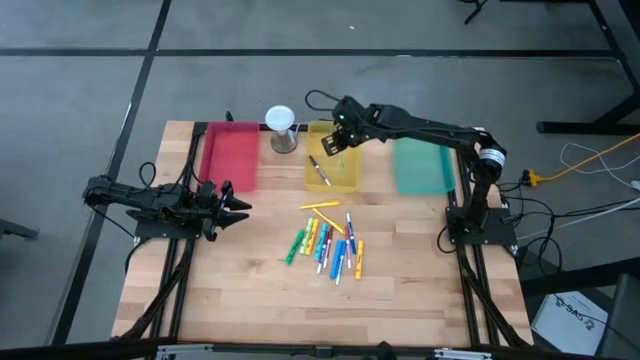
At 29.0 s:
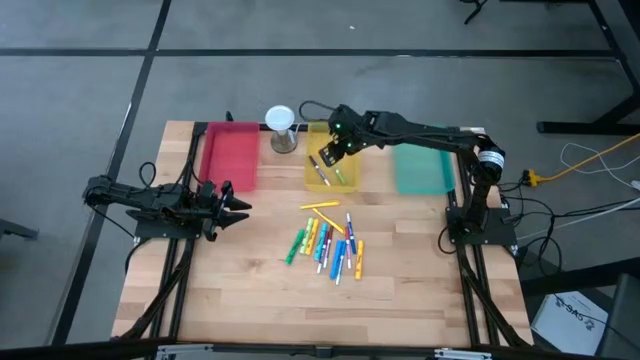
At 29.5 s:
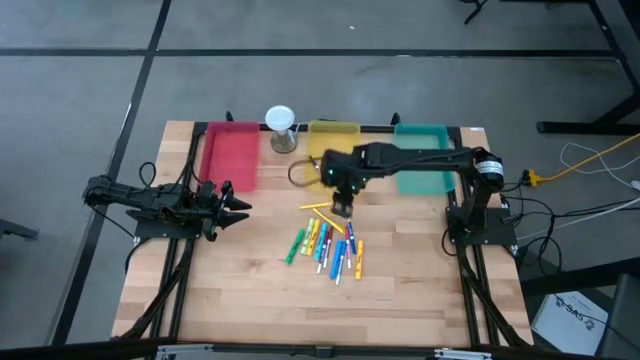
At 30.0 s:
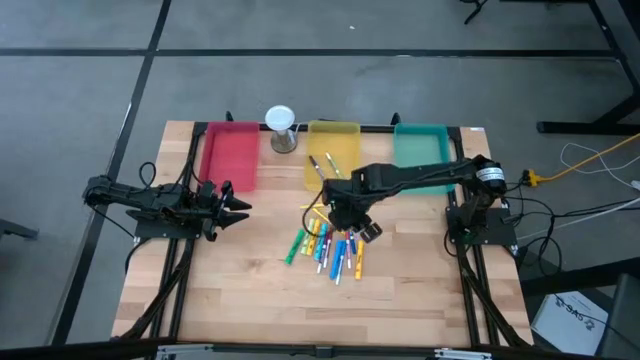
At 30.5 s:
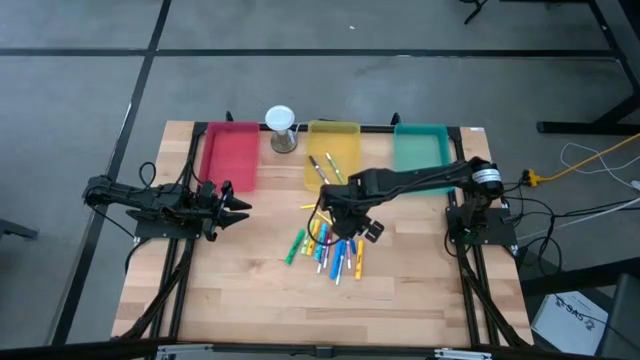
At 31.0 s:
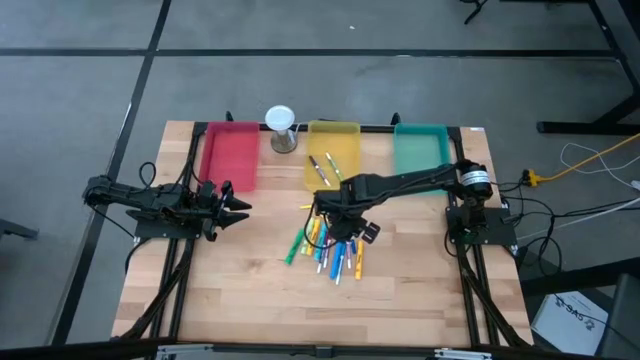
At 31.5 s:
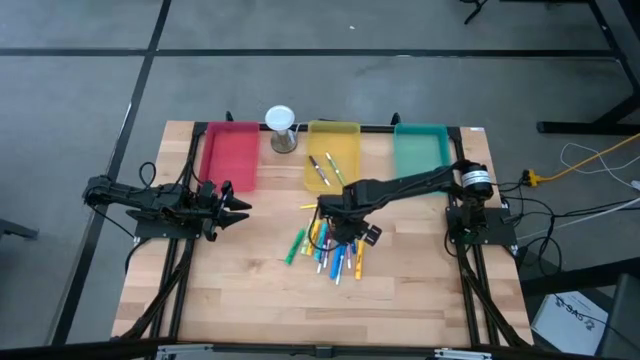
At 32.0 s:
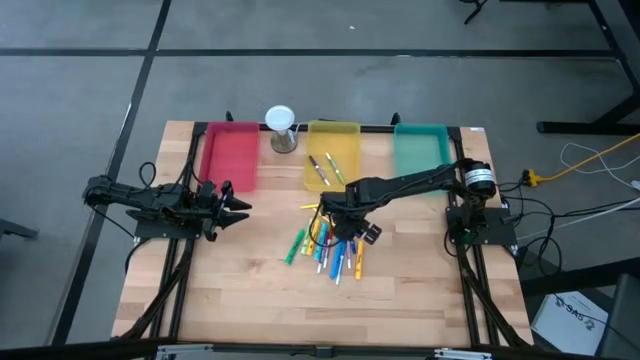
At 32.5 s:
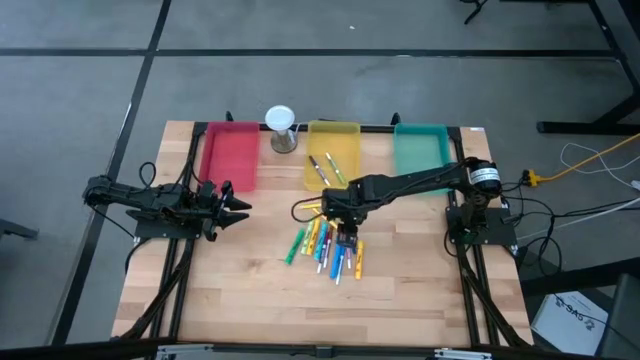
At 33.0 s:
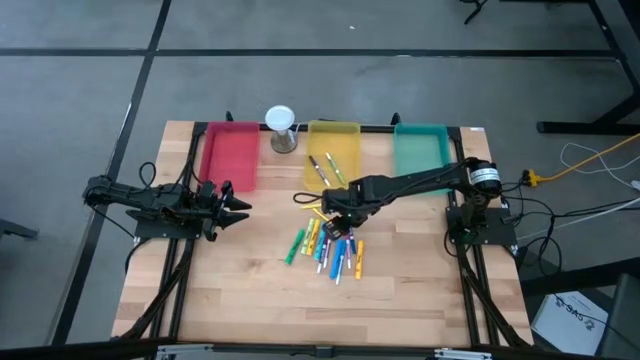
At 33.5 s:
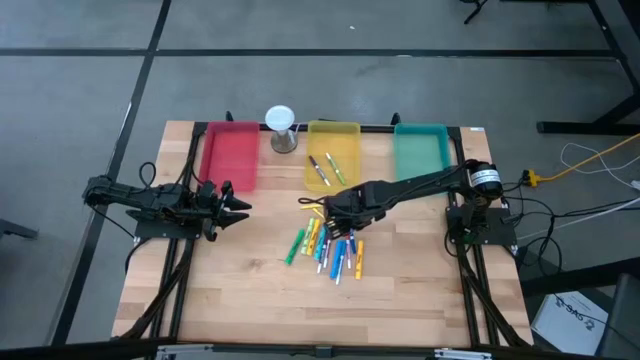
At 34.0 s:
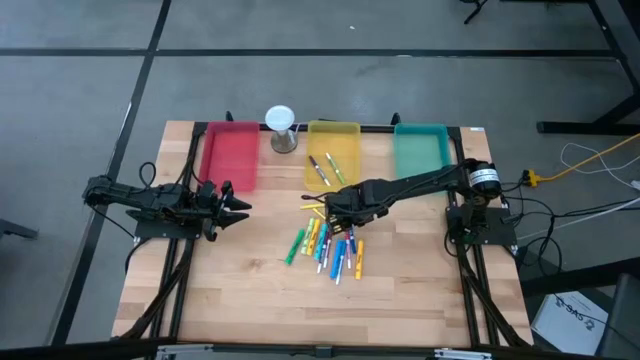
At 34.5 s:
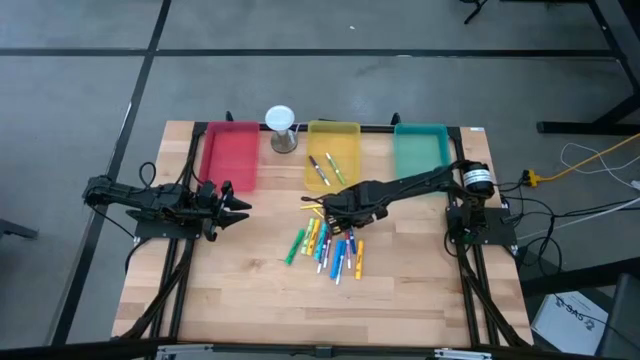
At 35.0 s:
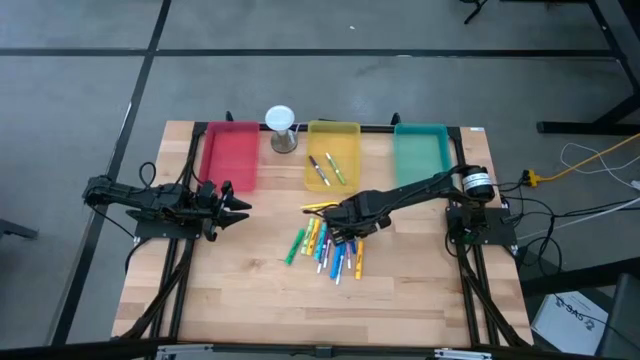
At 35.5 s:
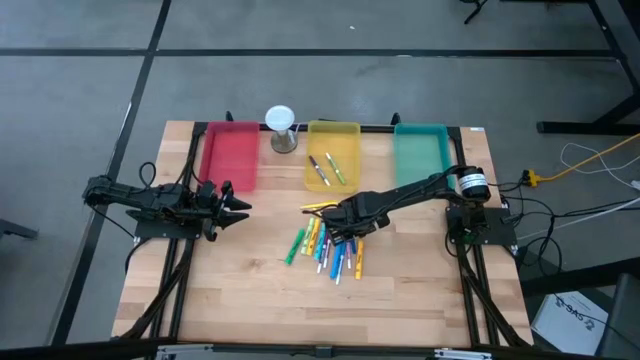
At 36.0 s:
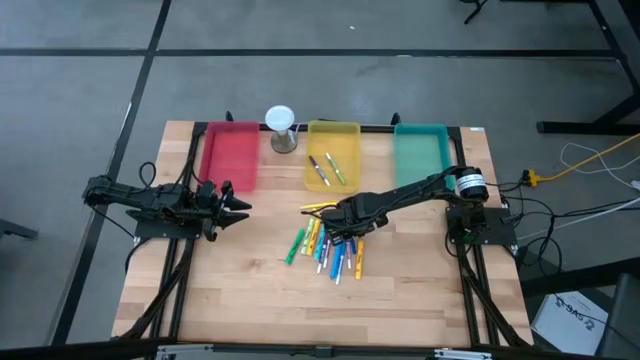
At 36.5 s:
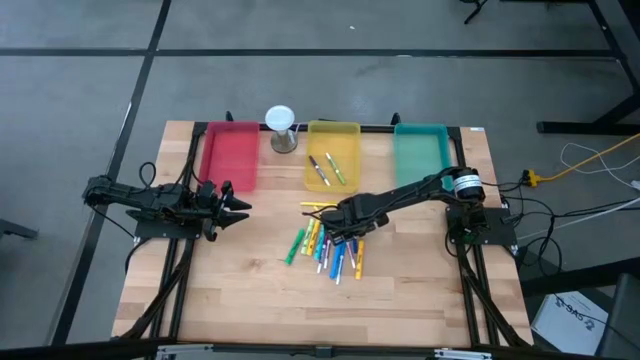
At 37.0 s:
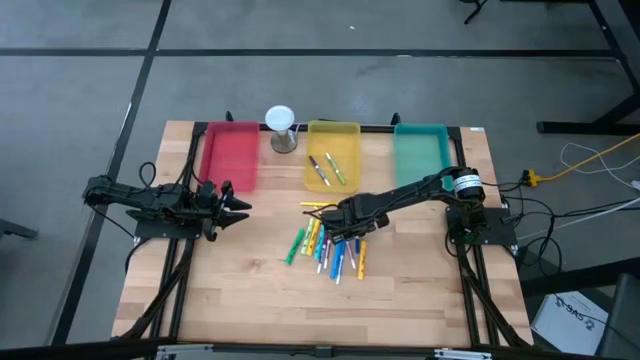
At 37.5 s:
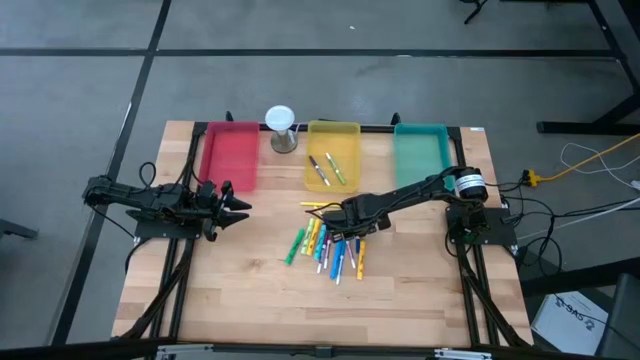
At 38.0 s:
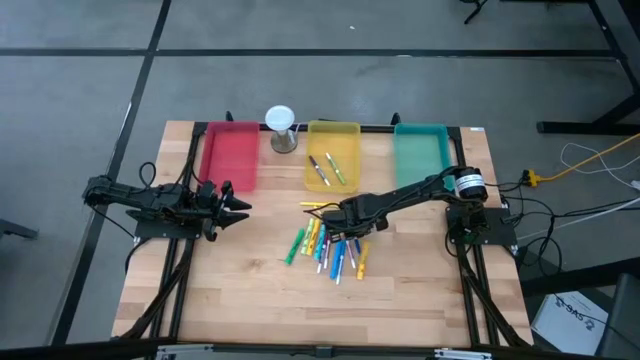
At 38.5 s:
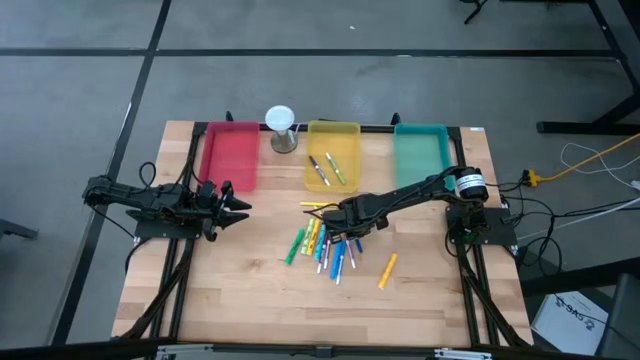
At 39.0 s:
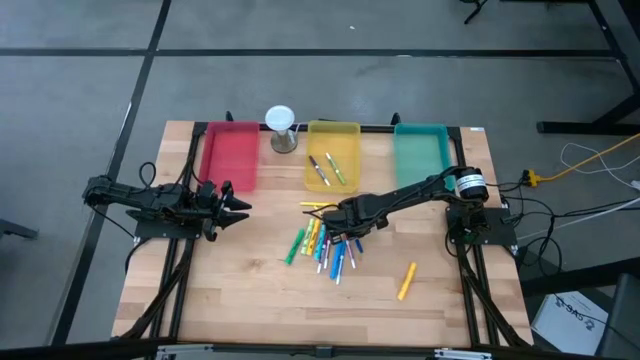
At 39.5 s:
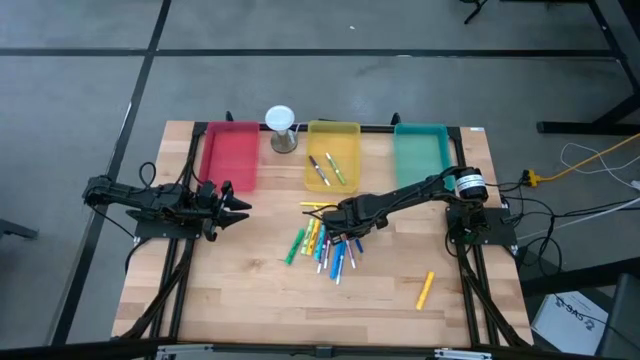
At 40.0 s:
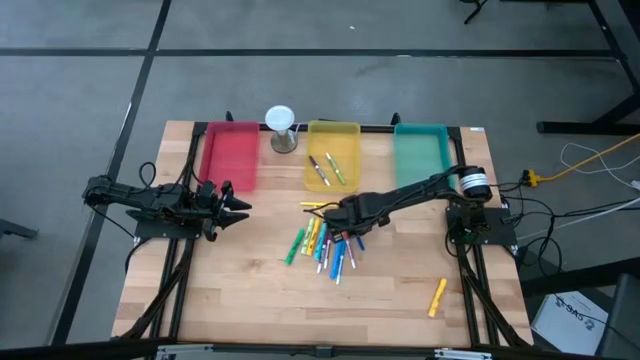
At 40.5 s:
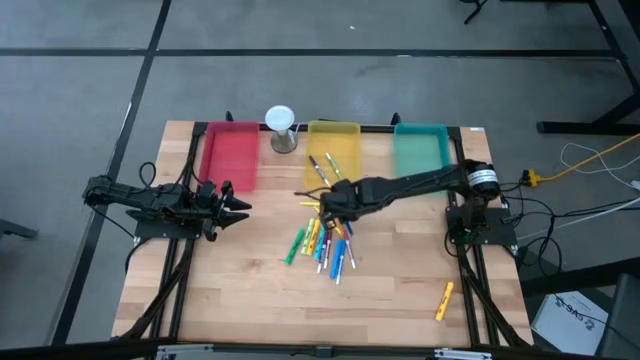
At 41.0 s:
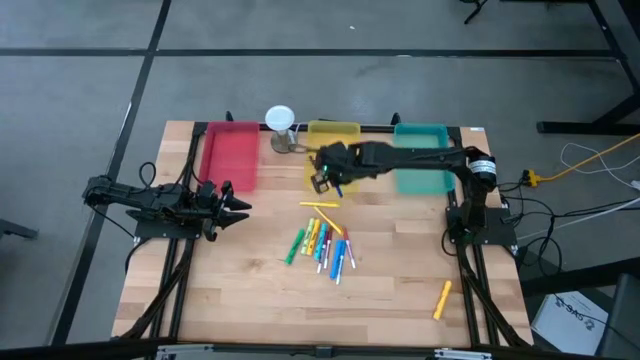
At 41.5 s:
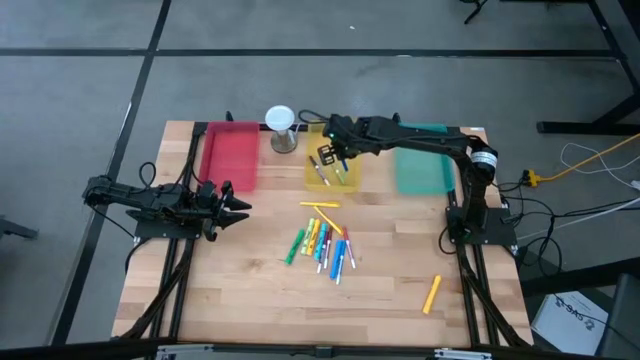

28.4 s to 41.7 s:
Task: Pick & Place Markers
Put the blue marker into the yellow bin

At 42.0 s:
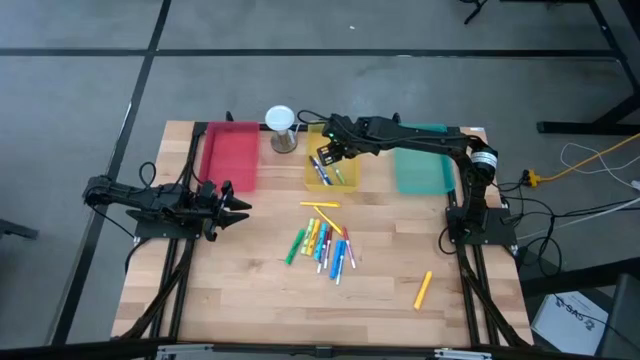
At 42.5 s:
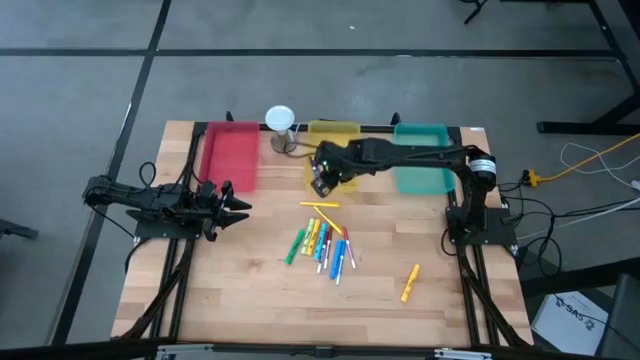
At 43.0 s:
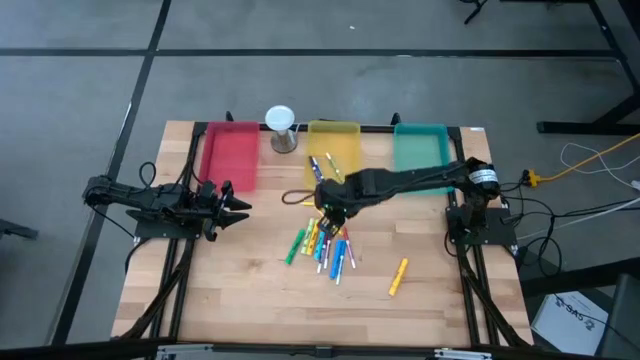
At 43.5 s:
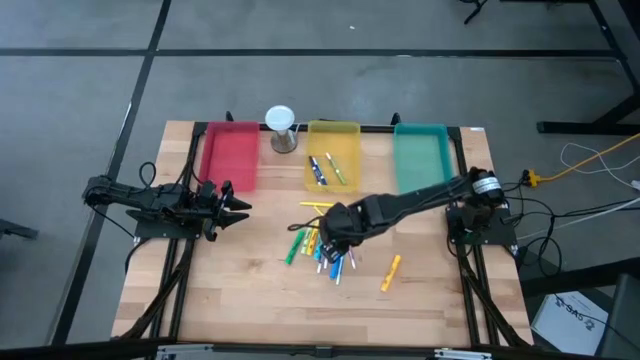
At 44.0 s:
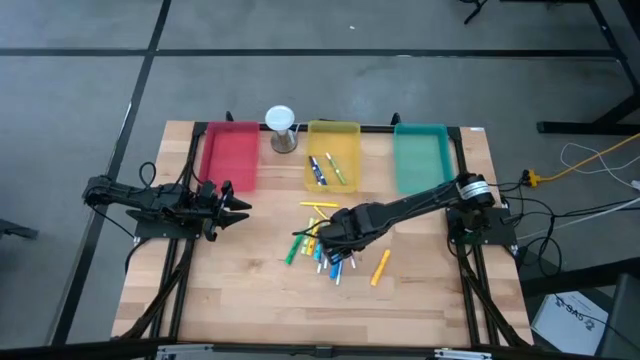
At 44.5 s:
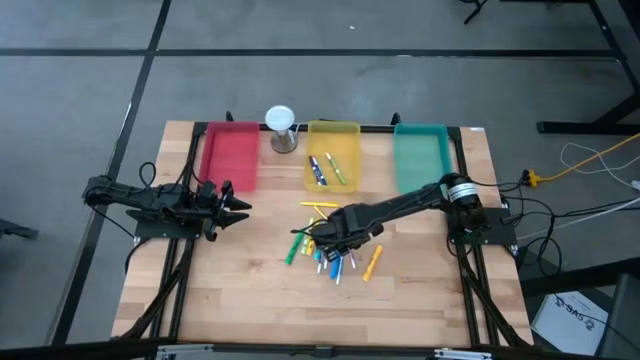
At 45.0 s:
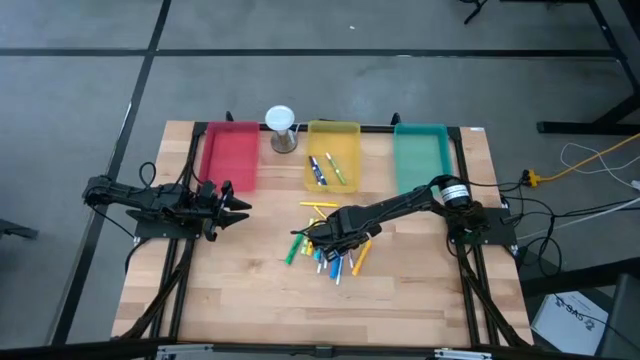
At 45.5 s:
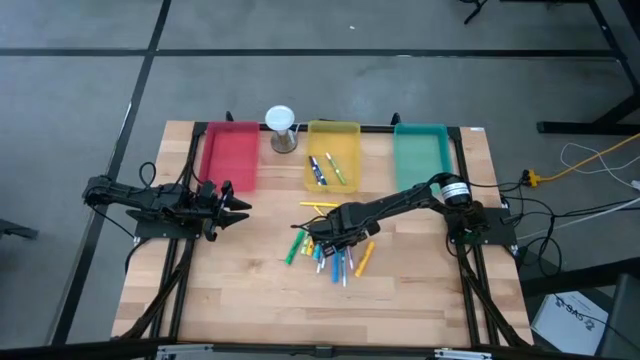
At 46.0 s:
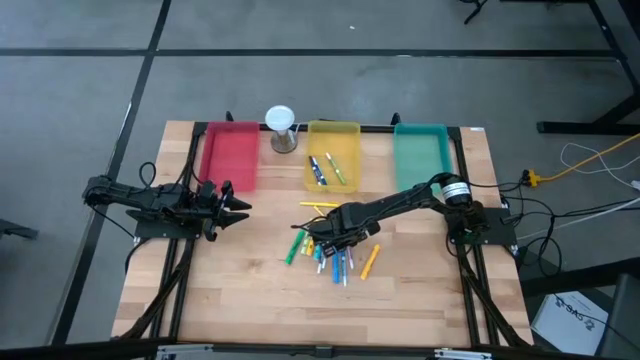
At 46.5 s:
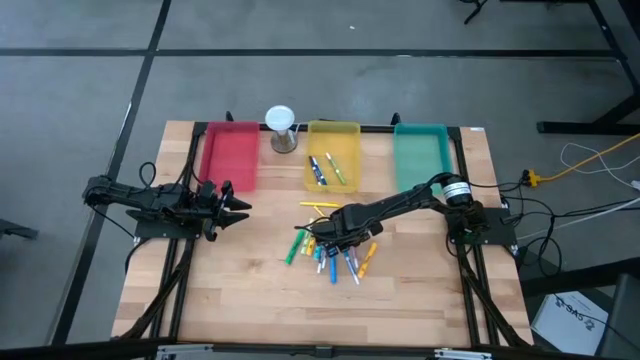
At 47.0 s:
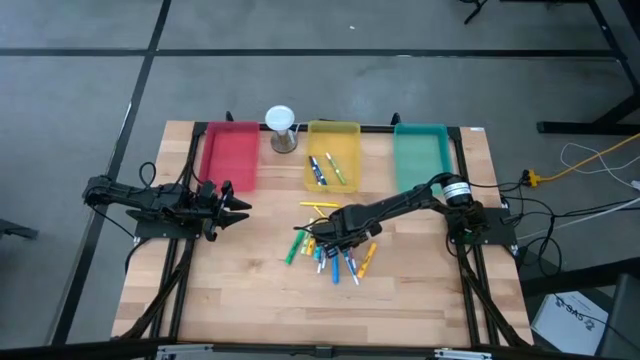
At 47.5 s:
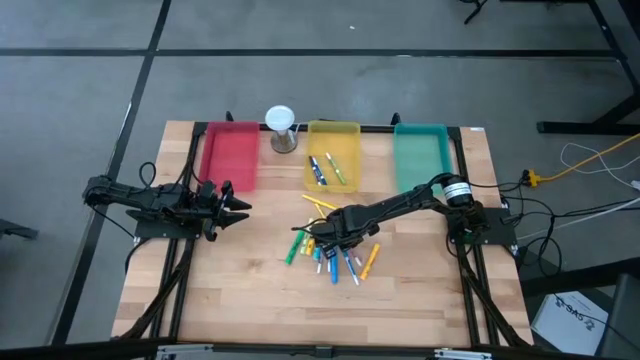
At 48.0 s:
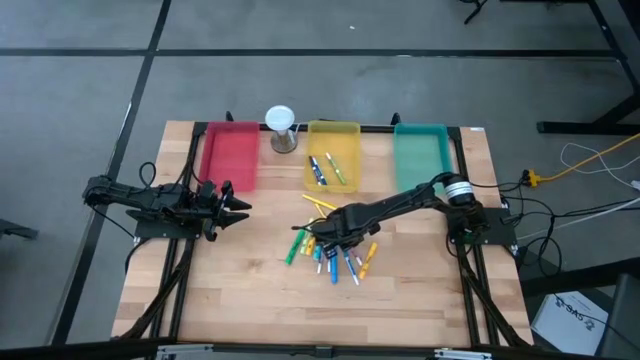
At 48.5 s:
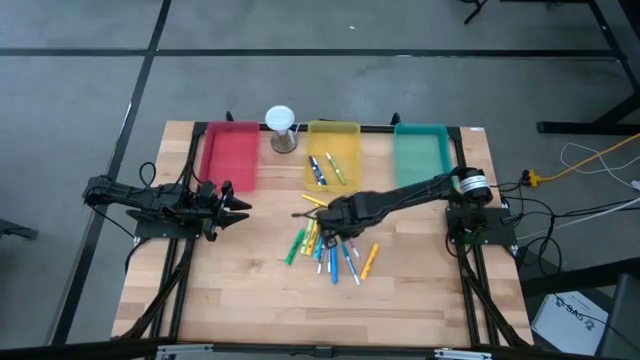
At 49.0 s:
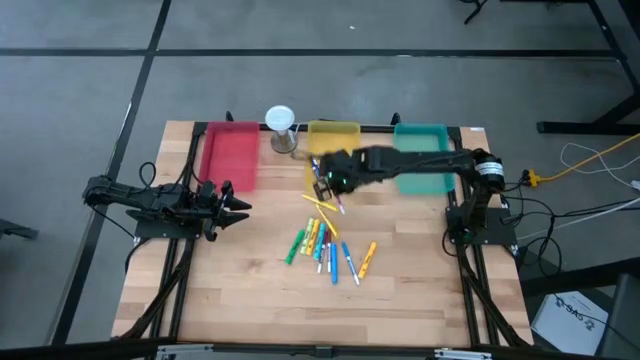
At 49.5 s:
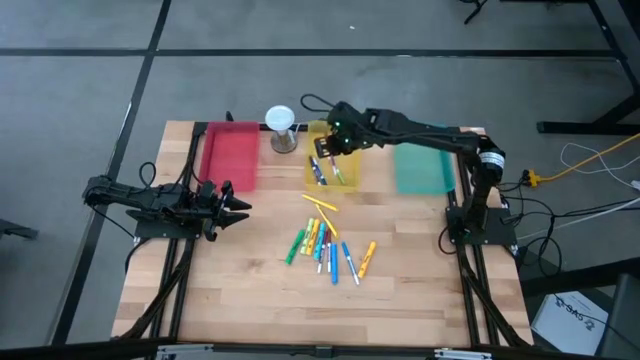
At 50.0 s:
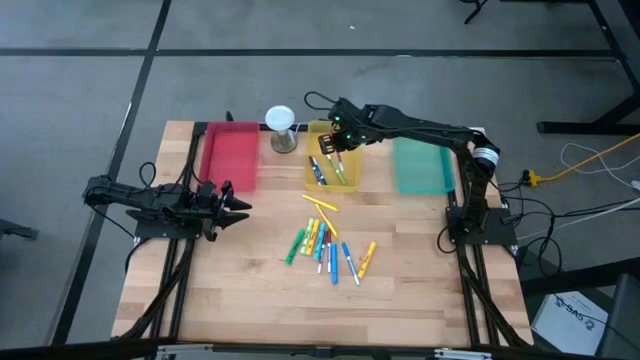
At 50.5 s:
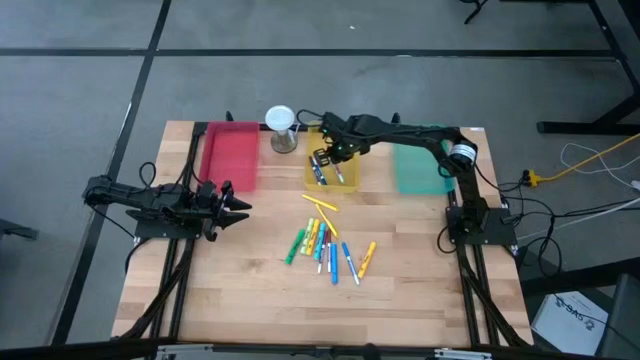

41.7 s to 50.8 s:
Put the pink marker into the yellow bin
